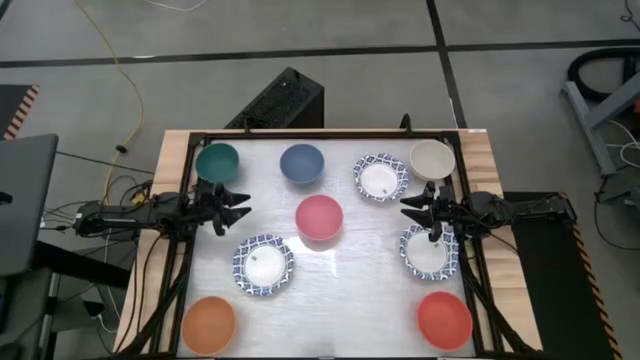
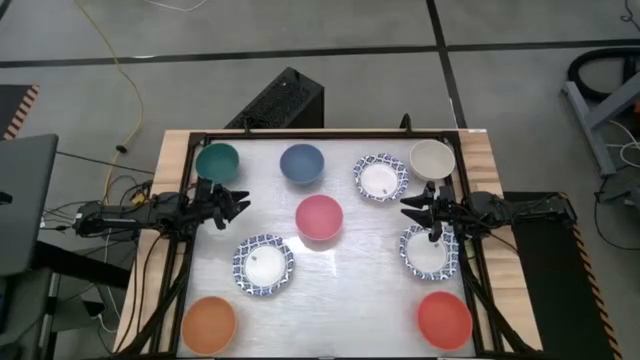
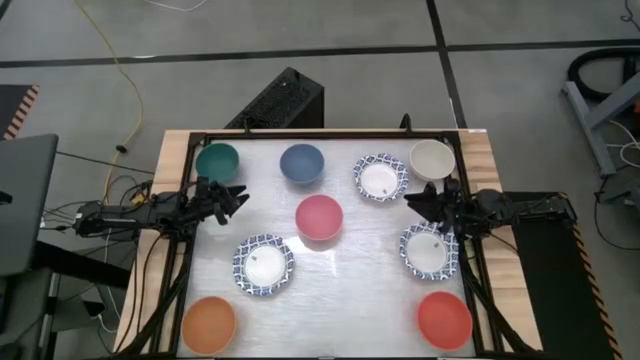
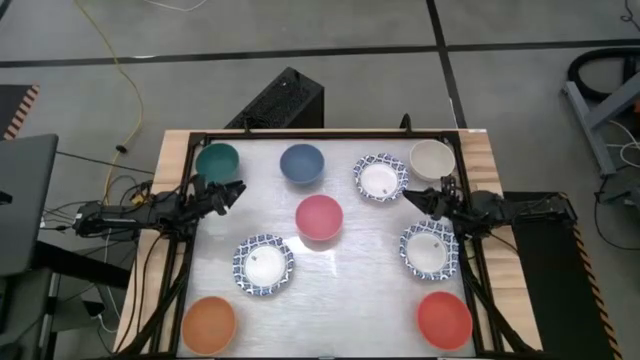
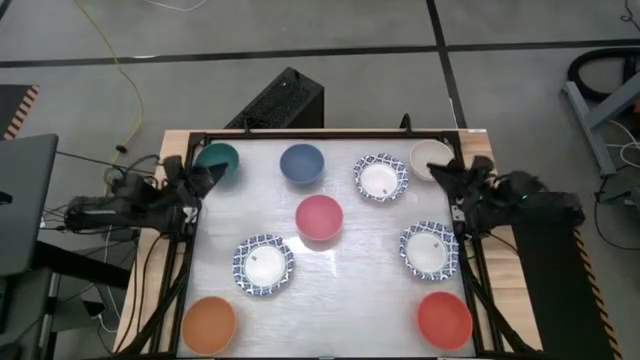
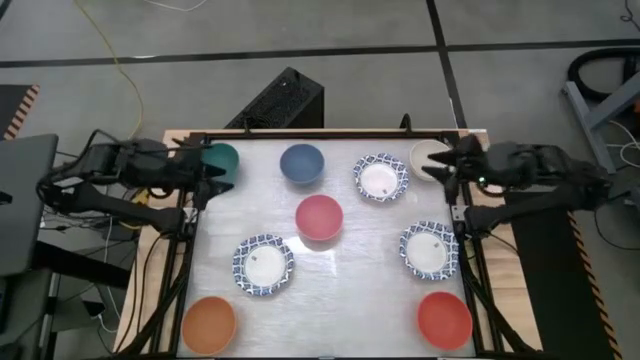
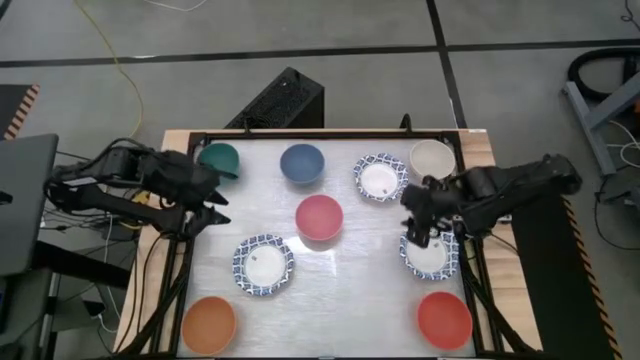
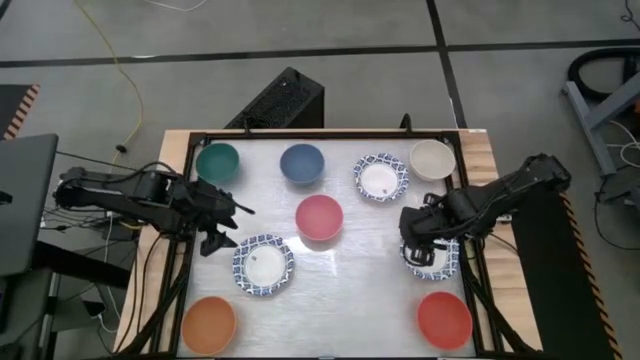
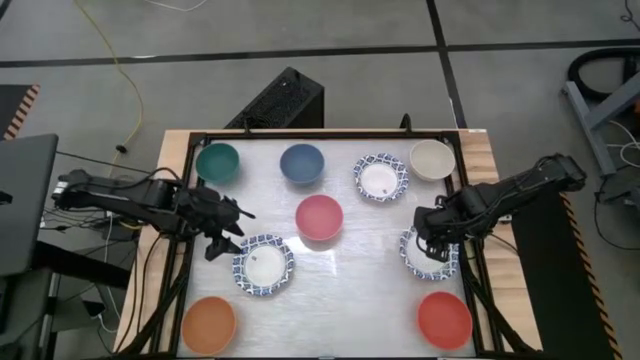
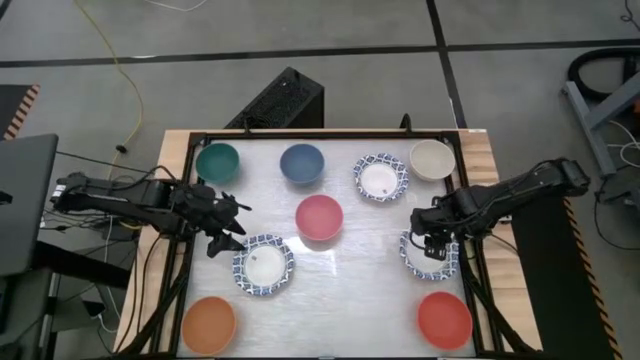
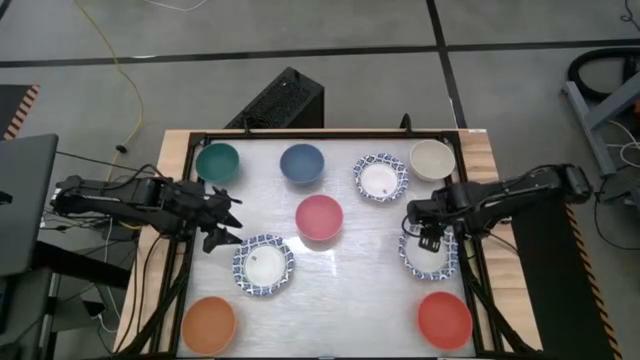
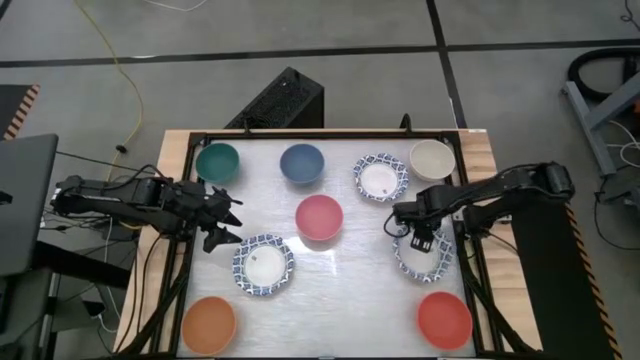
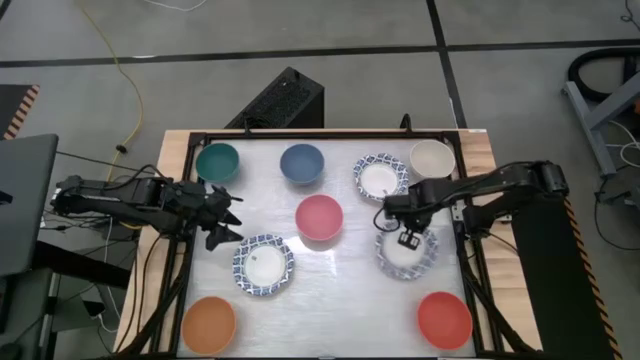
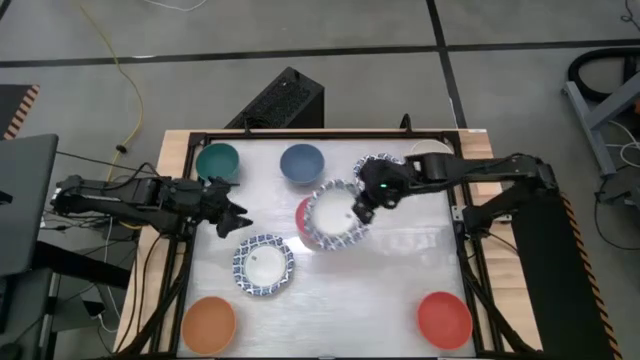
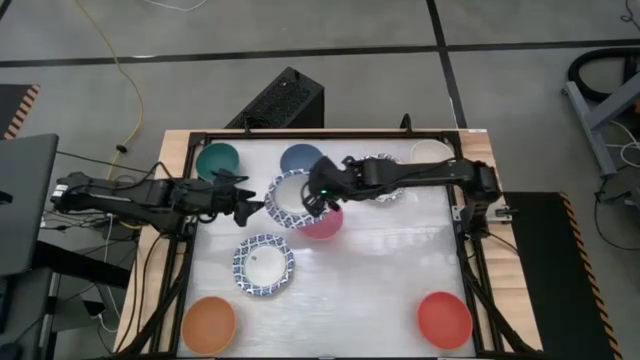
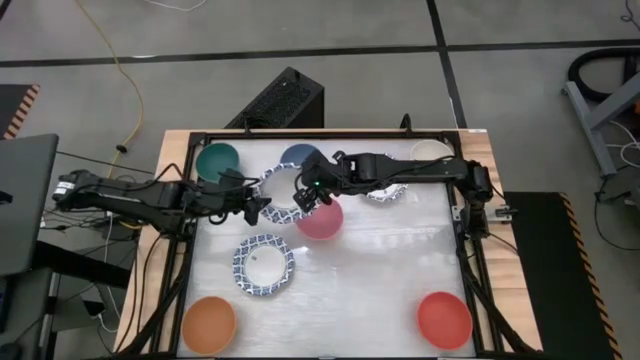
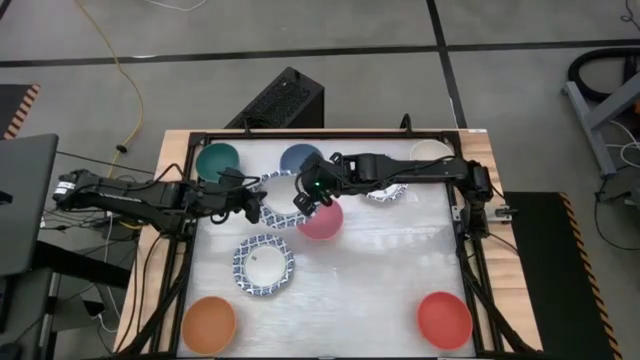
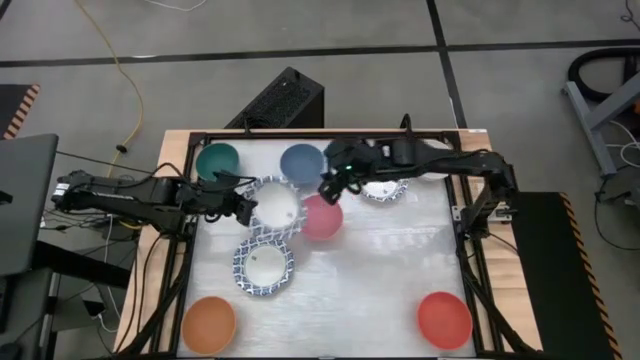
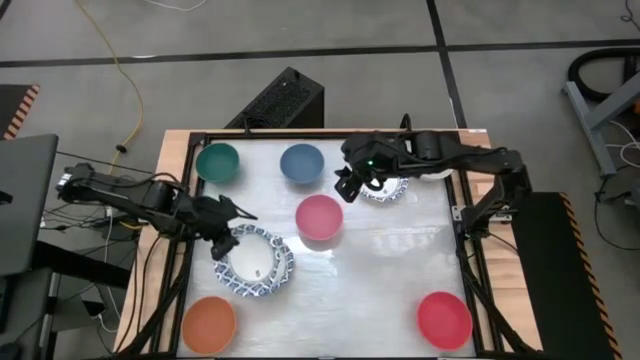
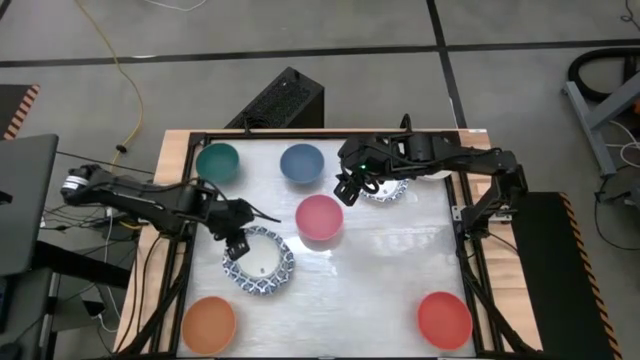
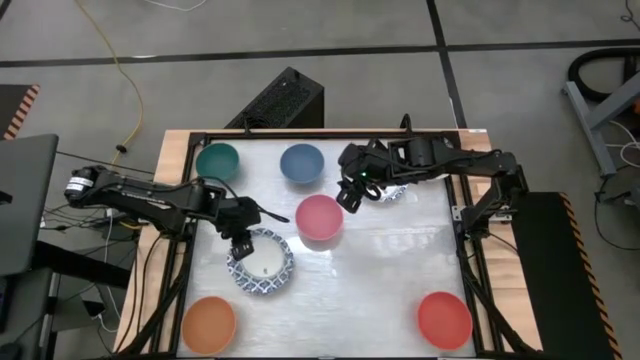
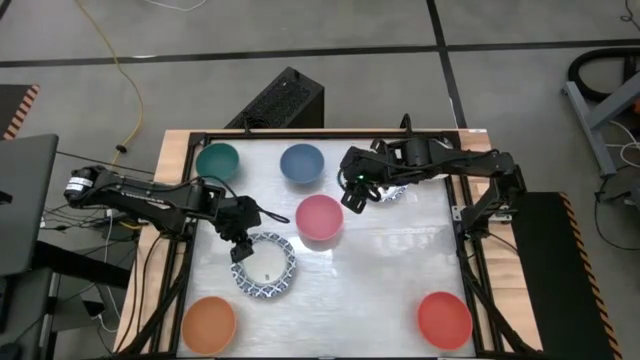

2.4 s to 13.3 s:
Stack the bottom right patterned white paper bowl on top of the bottom left patterned white paper bowl

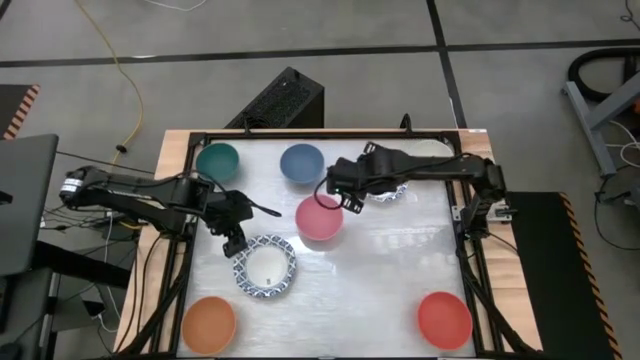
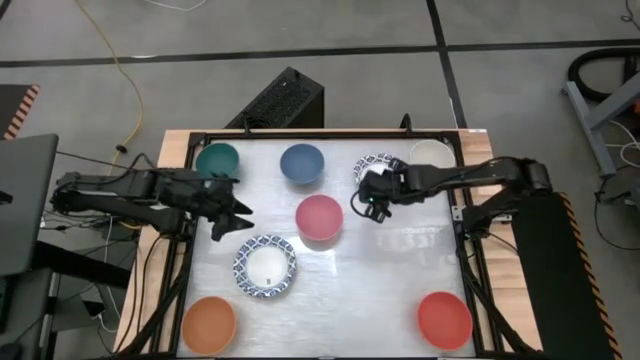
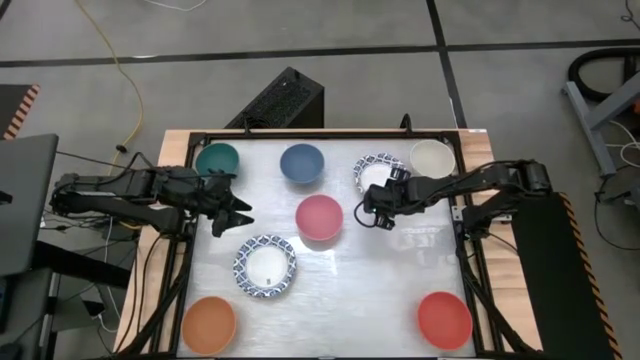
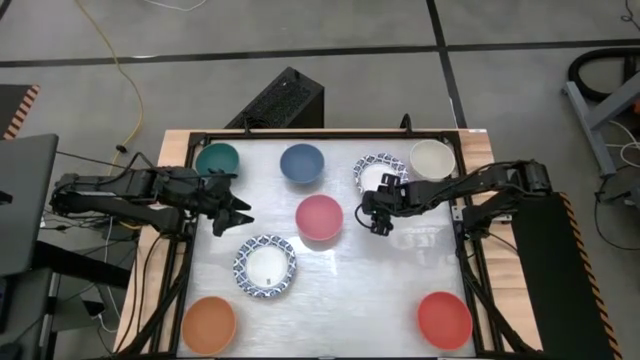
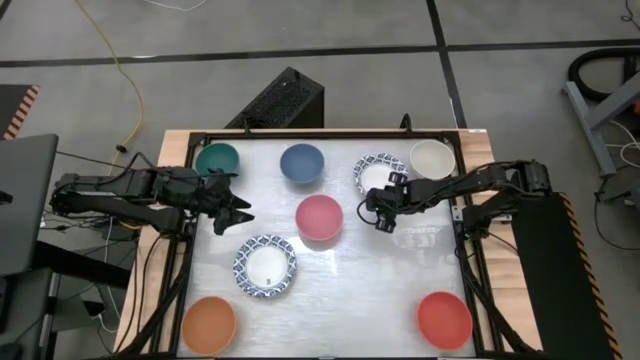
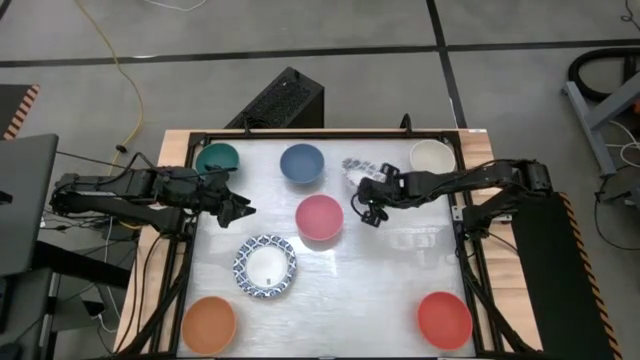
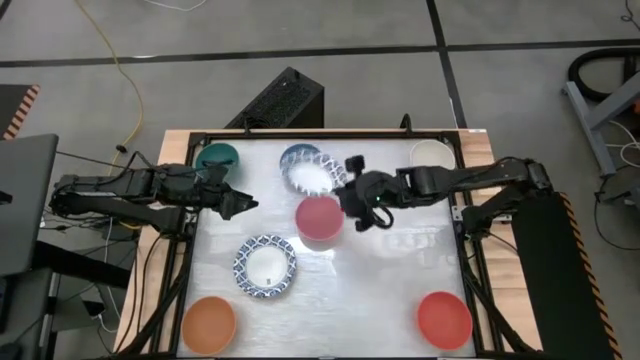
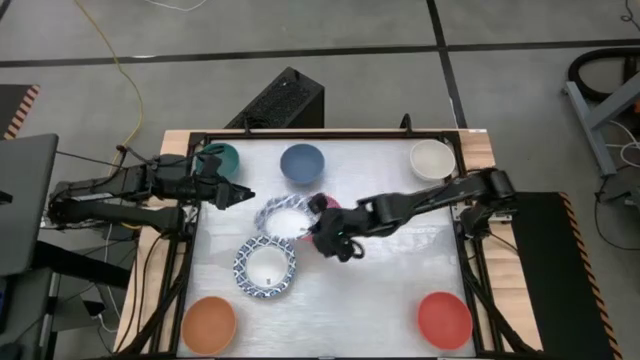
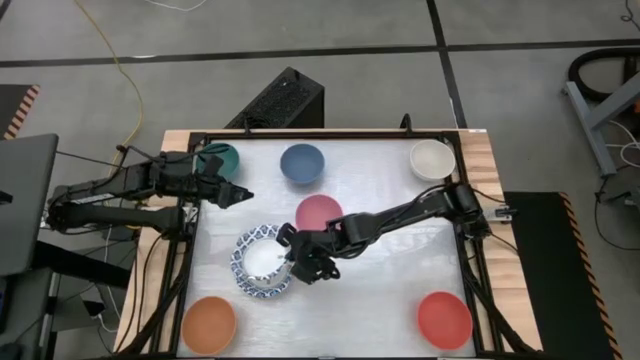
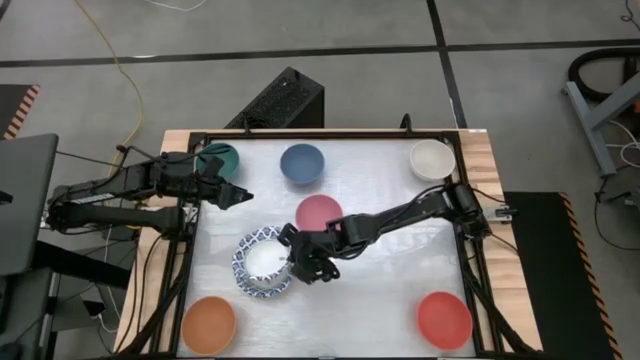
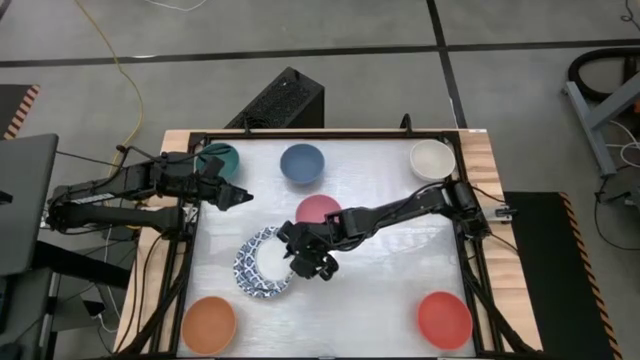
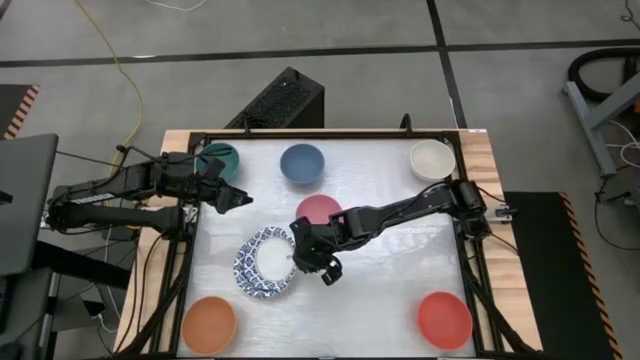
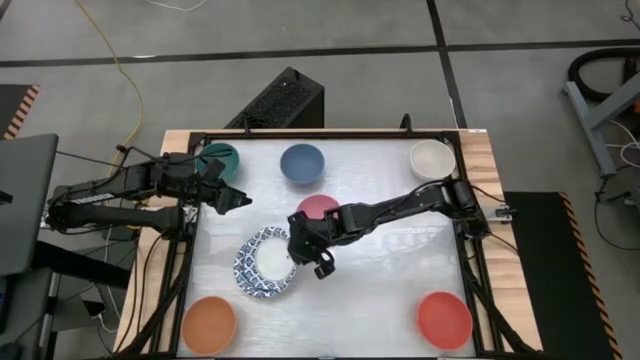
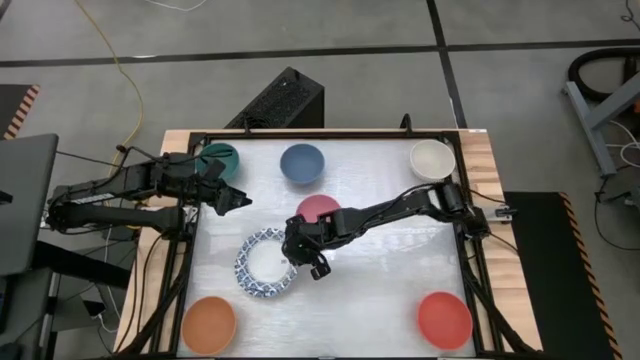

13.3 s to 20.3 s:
Stack the patterned white paper bowl on top of the patterned white paper bowl
